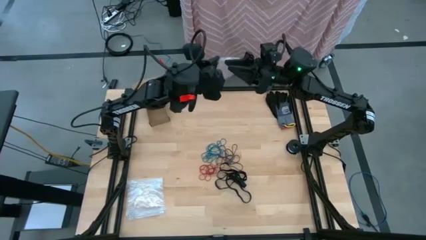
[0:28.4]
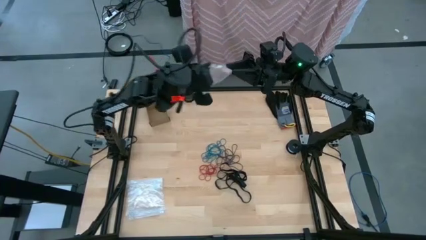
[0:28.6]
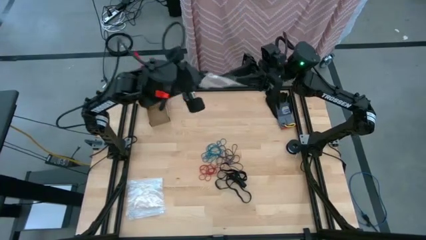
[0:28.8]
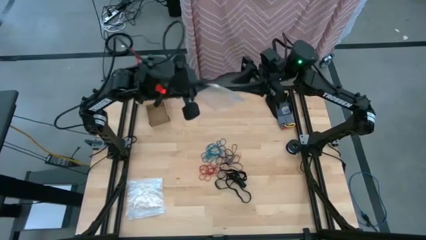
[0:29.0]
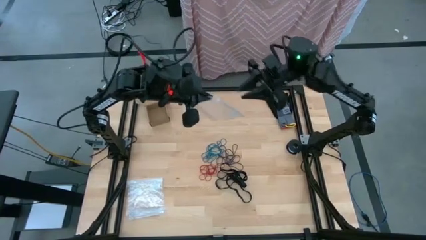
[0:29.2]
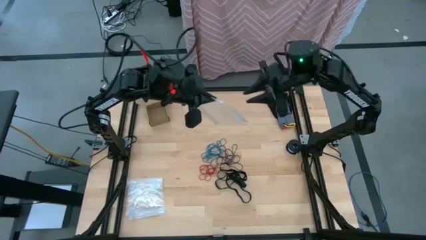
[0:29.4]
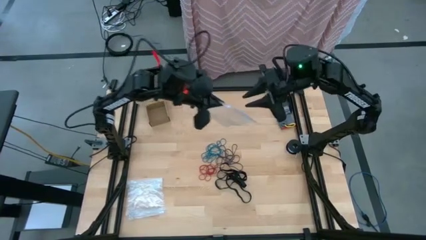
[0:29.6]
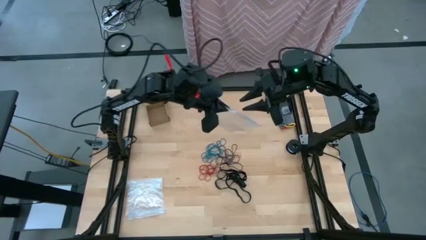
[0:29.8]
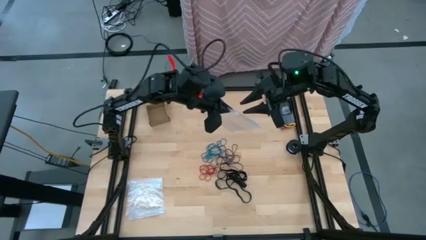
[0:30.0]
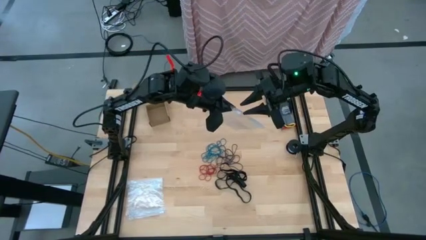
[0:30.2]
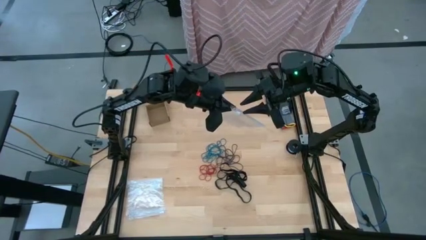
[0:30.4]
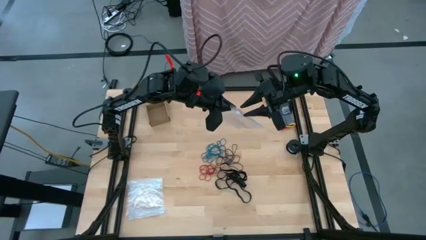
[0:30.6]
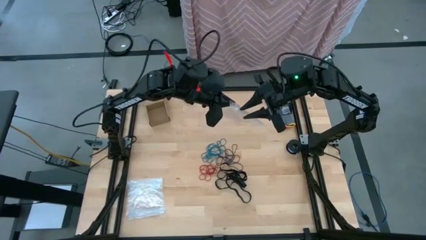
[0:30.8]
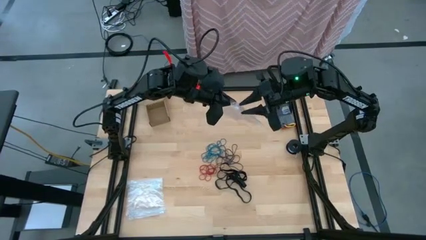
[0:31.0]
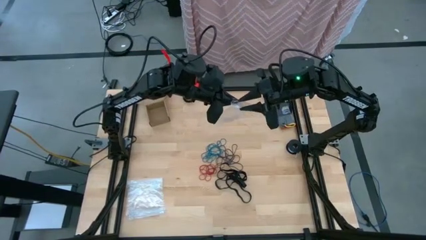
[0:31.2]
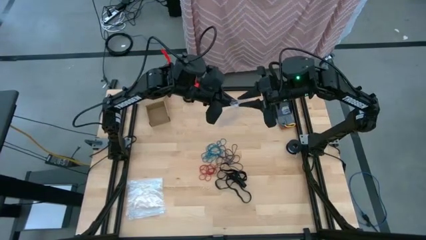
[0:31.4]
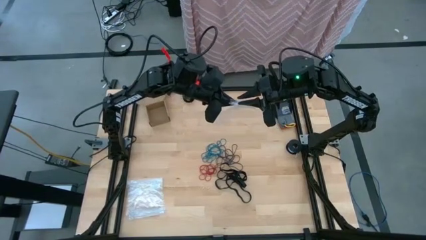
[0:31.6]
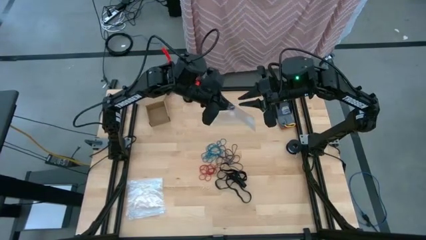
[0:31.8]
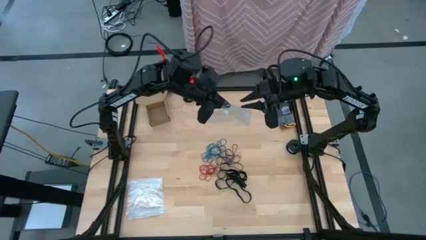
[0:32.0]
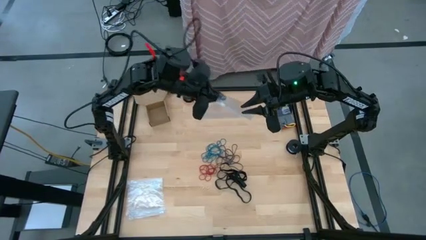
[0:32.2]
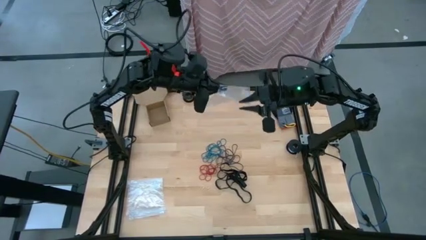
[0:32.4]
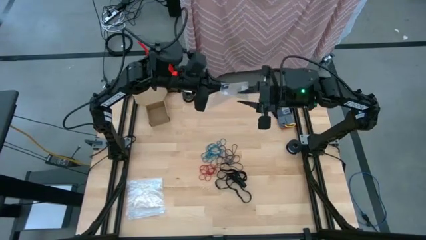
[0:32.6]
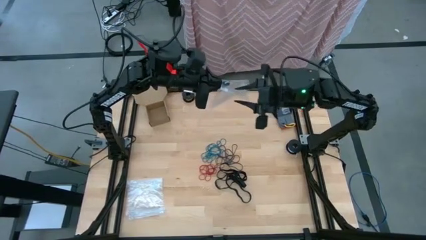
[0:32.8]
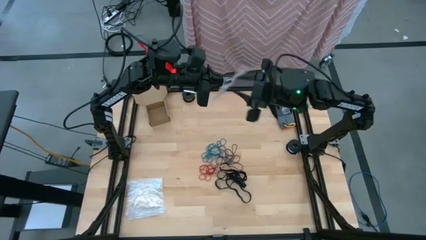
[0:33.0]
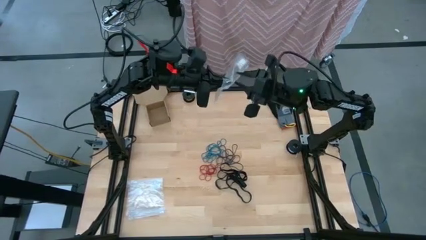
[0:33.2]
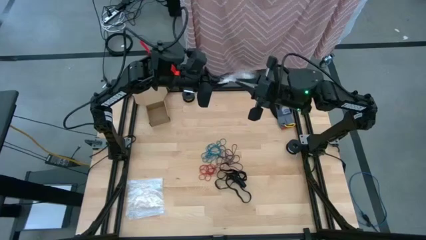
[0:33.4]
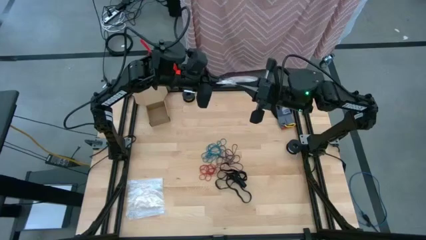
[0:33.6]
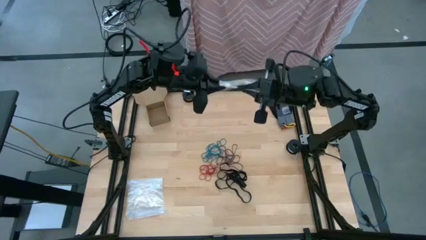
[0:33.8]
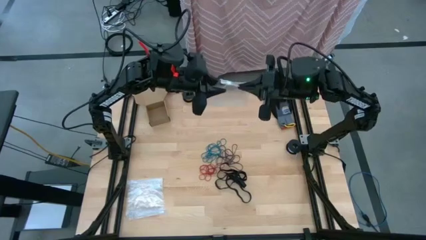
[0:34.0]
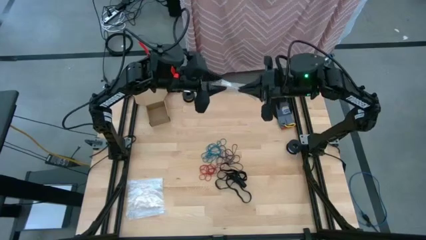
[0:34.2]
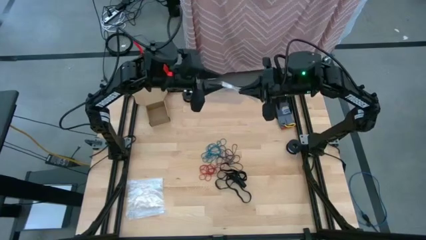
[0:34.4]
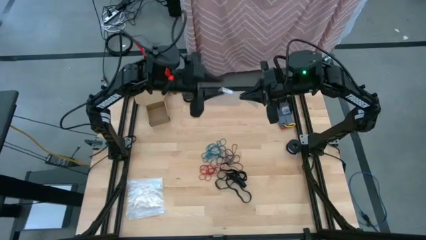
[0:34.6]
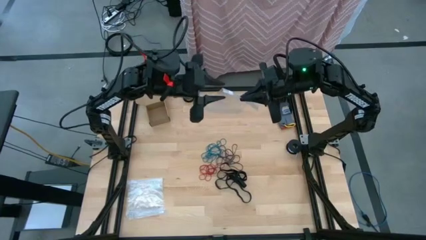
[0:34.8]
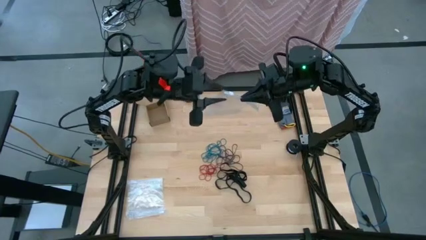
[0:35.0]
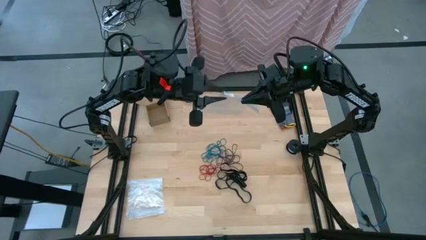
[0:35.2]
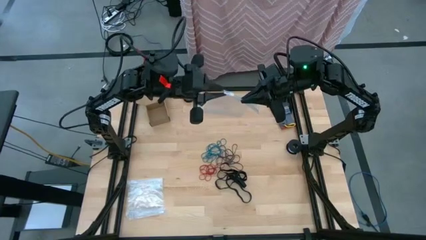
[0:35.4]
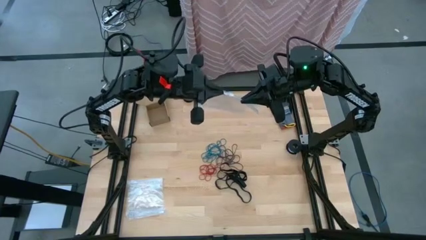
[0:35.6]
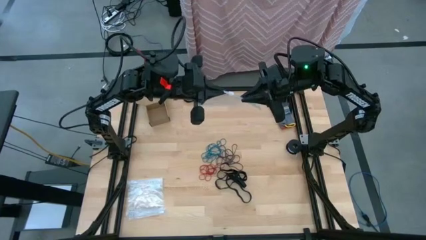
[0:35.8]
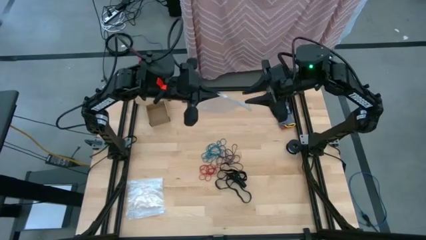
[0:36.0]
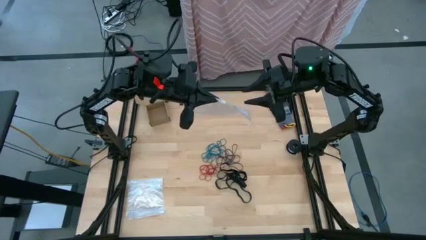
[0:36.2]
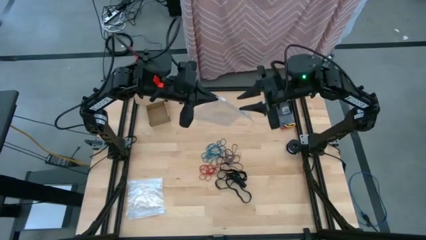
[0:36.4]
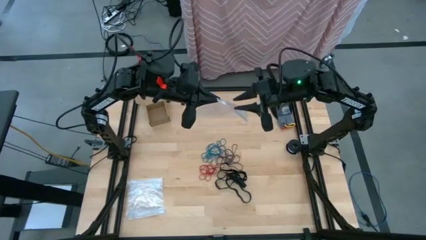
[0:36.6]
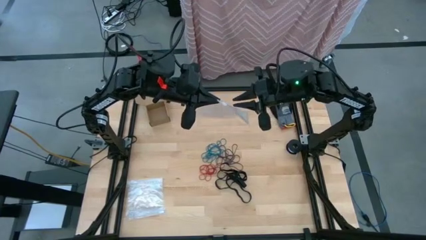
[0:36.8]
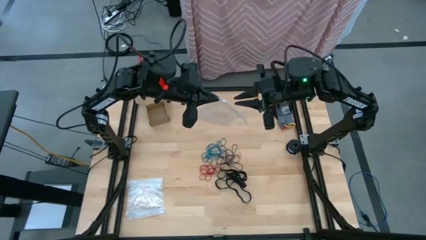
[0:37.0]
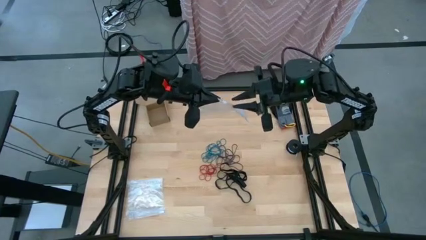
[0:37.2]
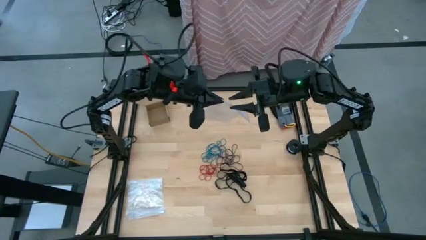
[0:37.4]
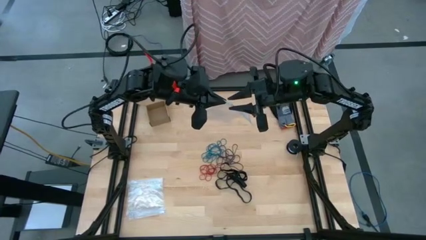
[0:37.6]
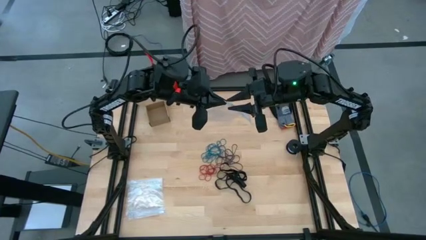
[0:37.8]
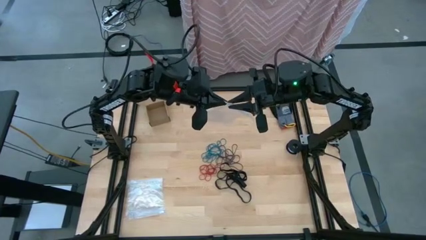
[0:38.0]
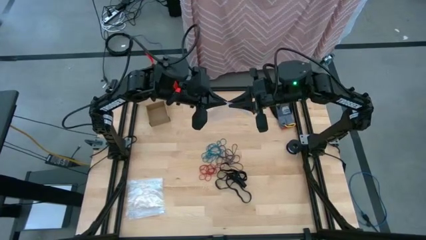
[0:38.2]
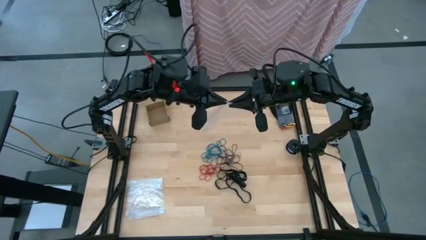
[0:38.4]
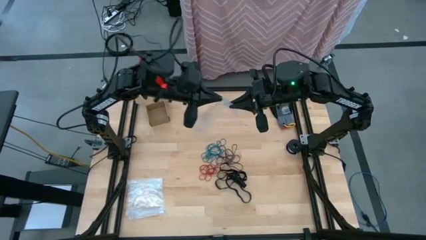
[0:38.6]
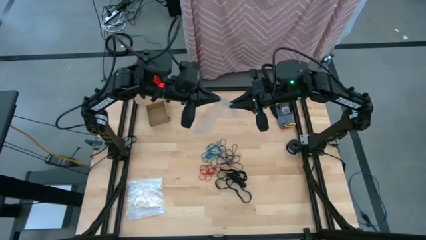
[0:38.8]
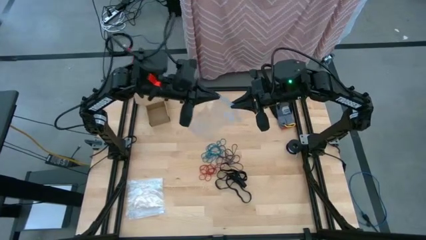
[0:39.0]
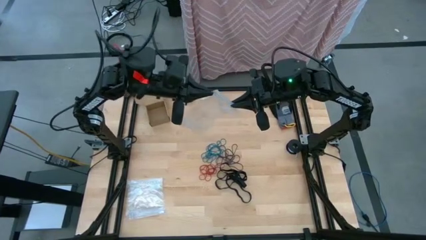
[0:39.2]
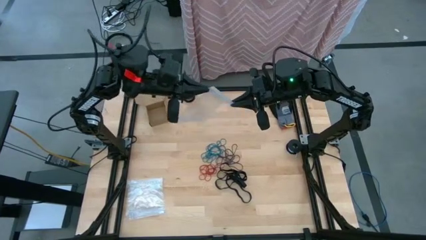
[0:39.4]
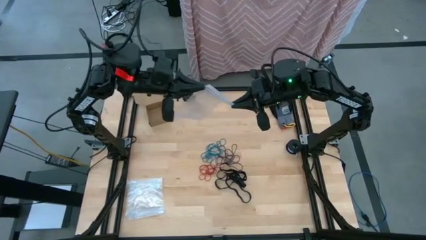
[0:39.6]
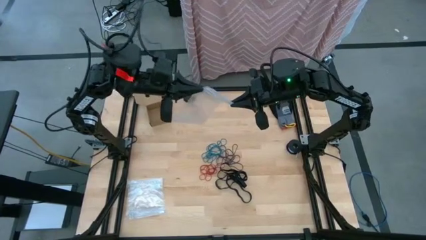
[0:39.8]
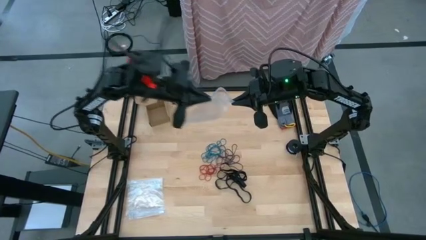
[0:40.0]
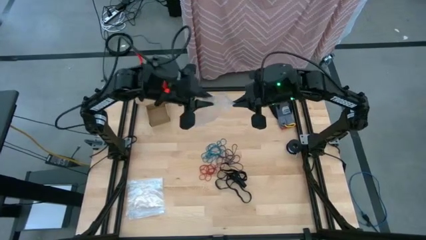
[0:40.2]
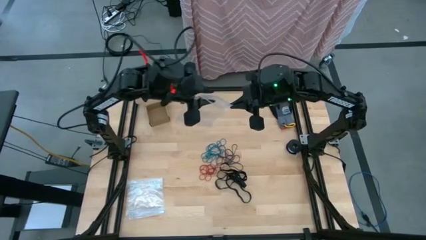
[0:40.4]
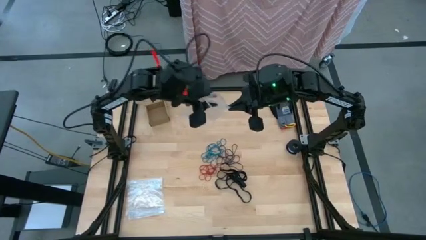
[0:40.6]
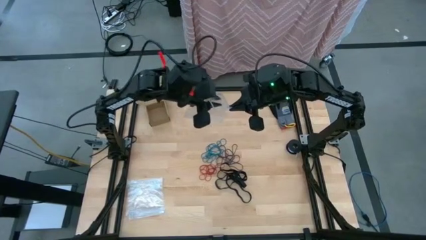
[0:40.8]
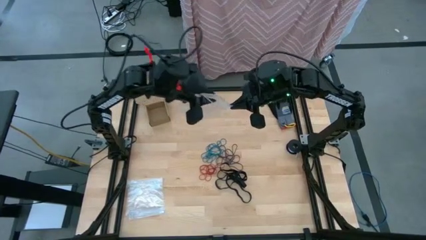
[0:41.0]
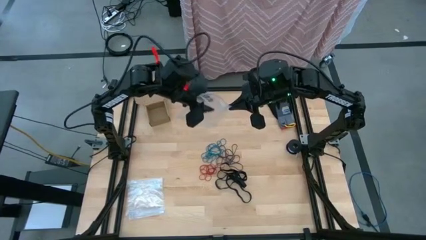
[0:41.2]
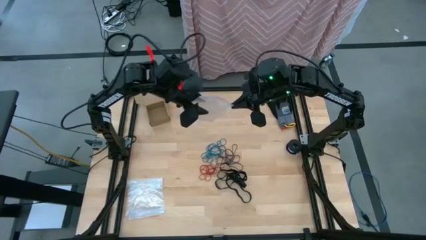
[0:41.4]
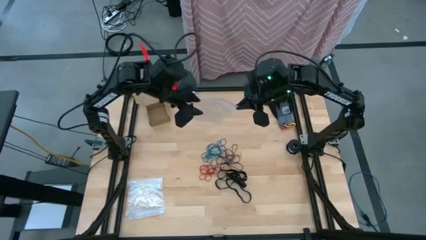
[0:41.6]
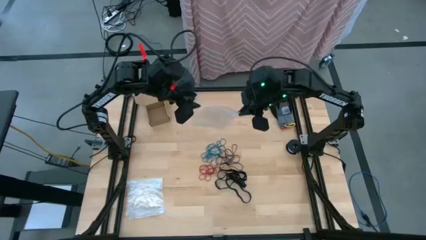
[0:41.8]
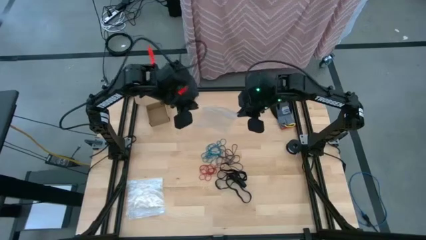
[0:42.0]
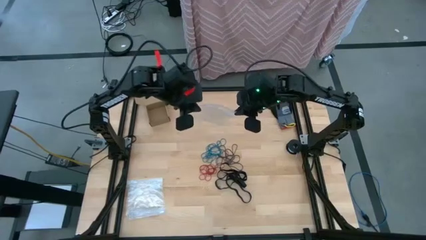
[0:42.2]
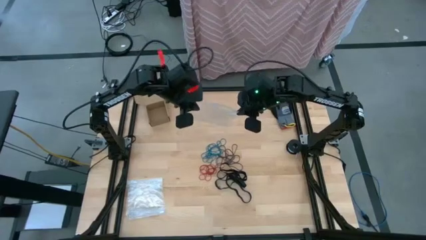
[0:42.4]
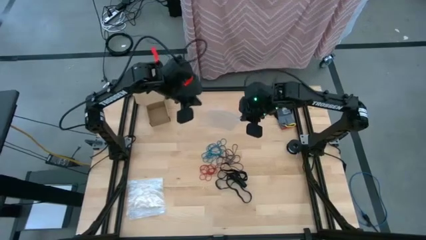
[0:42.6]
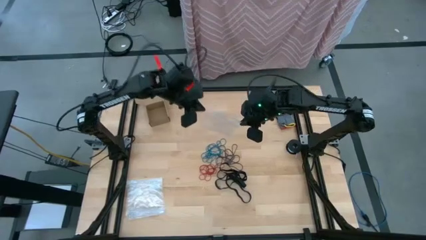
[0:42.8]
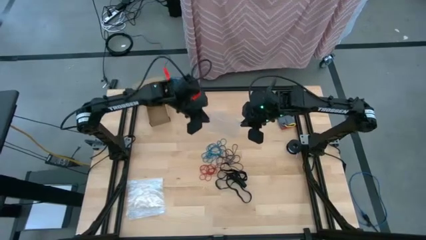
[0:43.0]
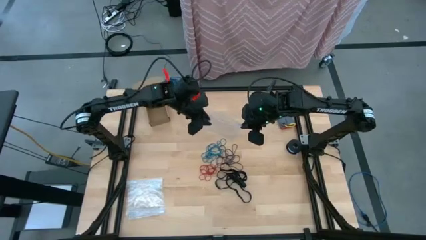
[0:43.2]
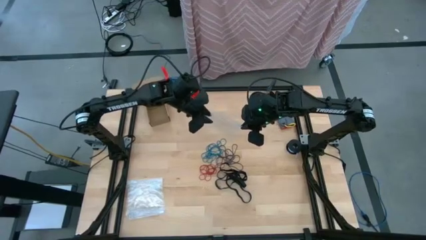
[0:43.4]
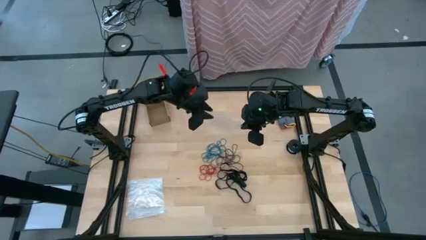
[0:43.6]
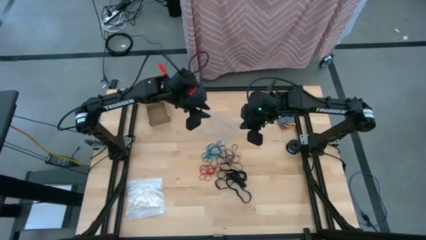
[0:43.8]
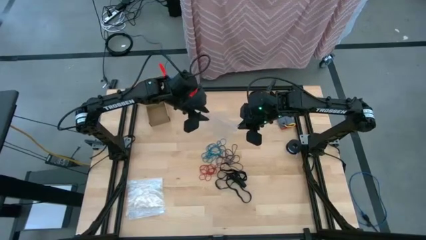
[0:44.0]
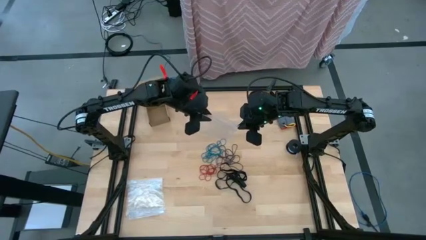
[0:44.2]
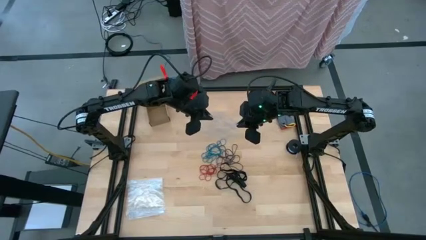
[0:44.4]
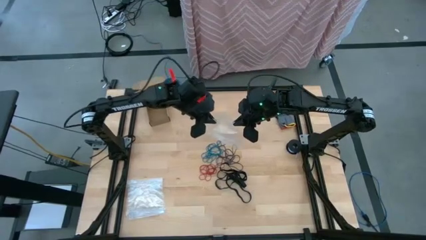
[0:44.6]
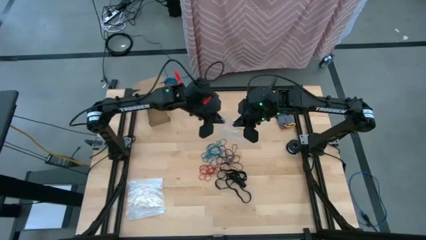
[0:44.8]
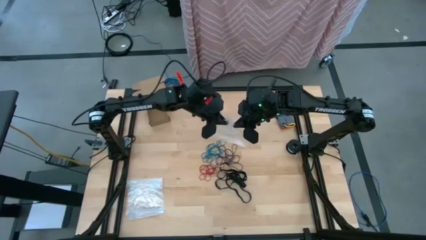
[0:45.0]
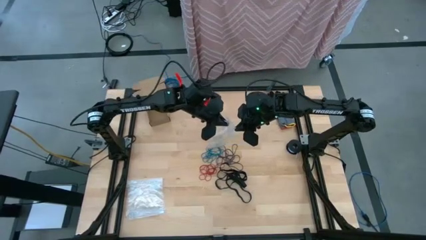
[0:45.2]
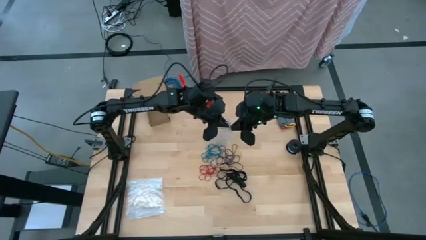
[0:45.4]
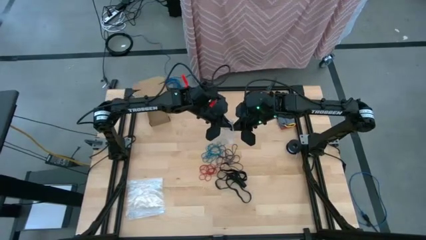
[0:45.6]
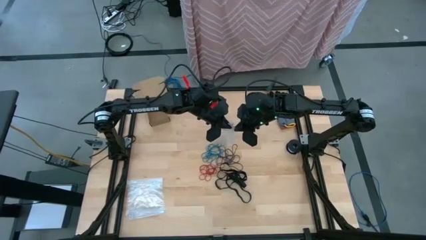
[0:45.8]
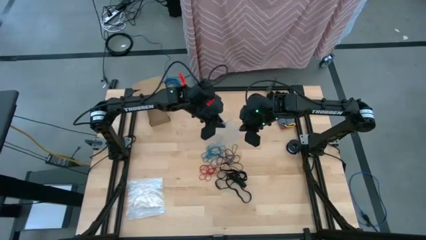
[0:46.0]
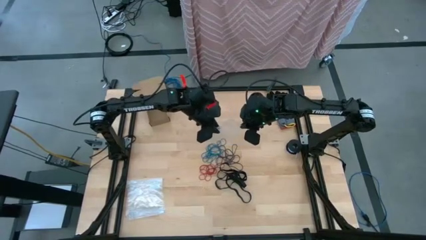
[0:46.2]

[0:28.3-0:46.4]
Task: Sort rubber bands
Open the transparent zip bag
